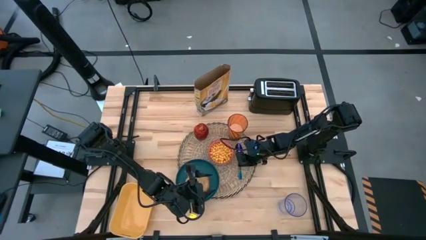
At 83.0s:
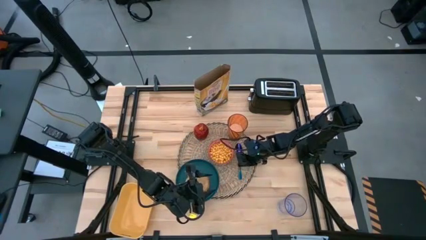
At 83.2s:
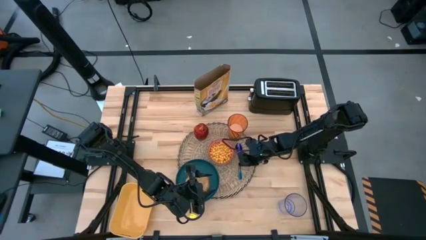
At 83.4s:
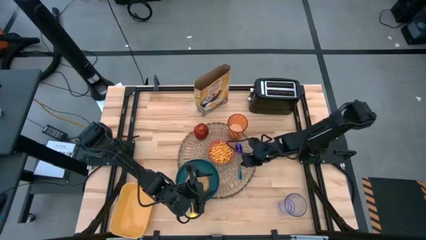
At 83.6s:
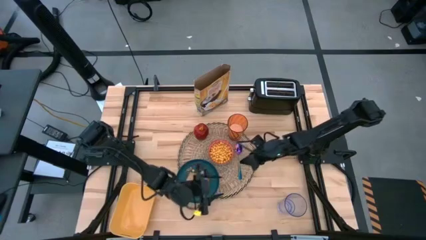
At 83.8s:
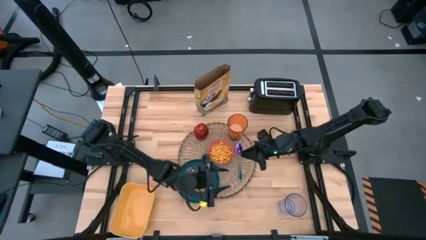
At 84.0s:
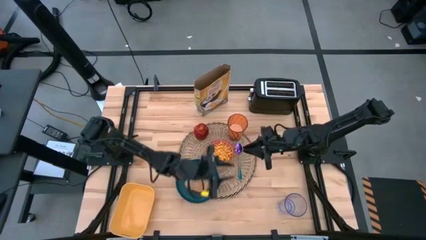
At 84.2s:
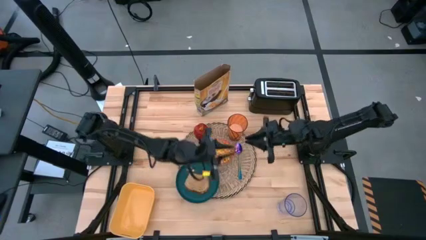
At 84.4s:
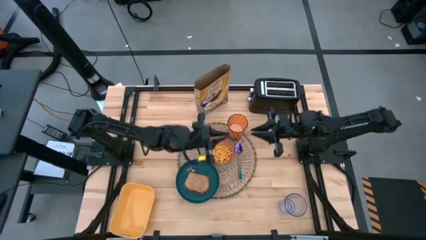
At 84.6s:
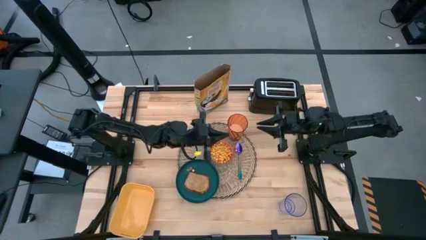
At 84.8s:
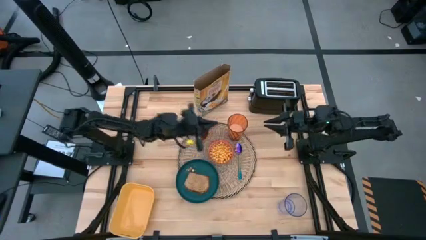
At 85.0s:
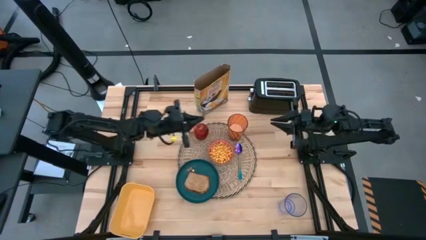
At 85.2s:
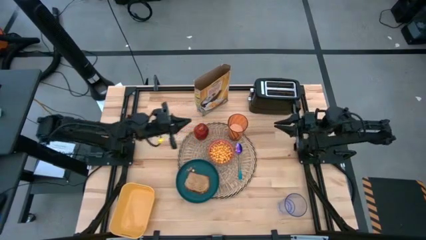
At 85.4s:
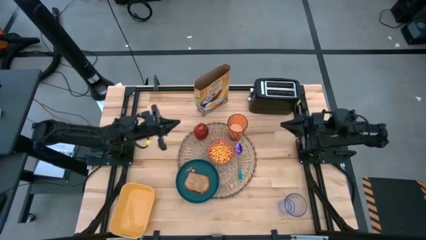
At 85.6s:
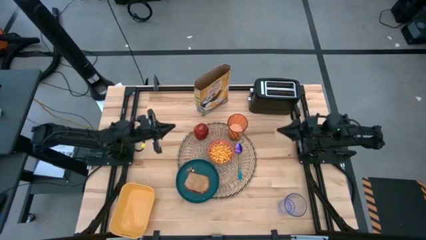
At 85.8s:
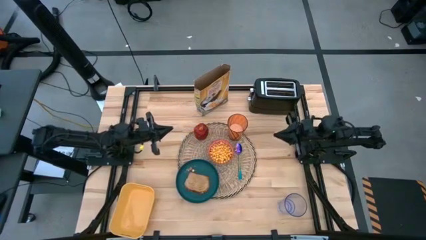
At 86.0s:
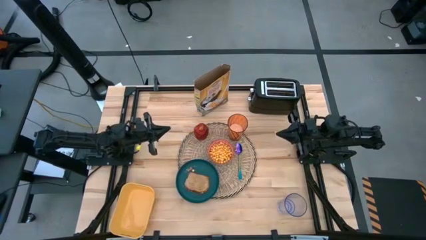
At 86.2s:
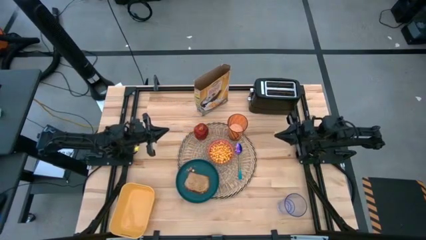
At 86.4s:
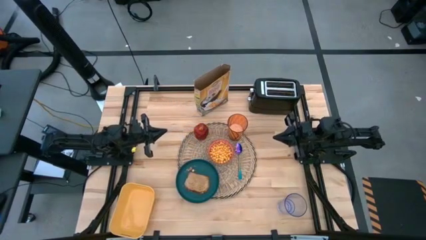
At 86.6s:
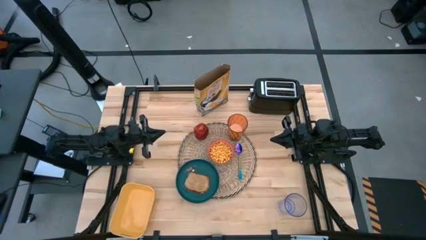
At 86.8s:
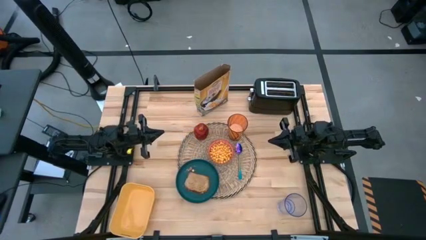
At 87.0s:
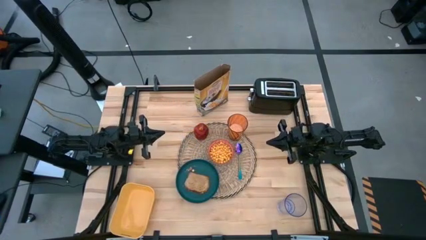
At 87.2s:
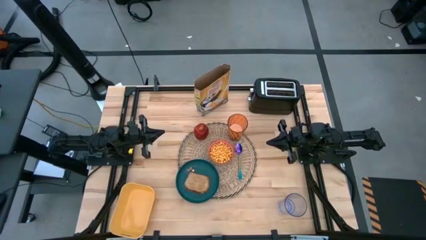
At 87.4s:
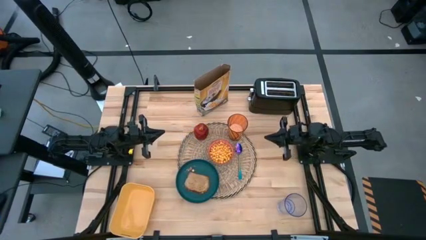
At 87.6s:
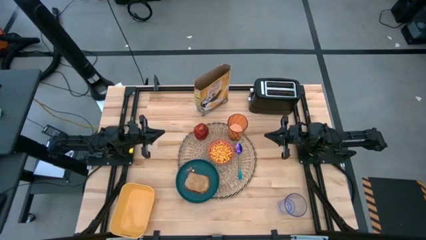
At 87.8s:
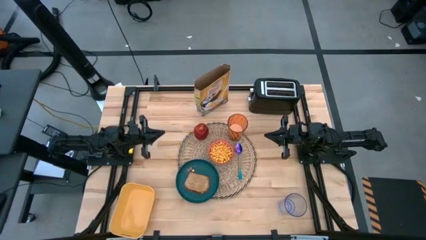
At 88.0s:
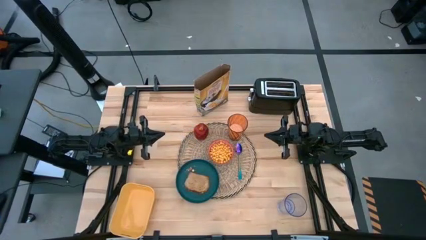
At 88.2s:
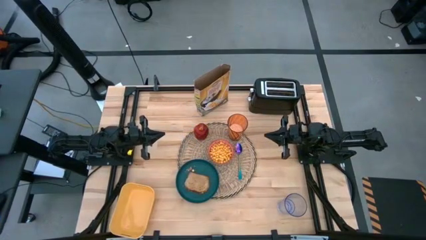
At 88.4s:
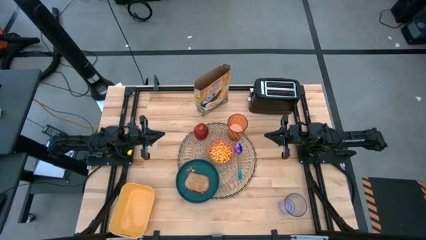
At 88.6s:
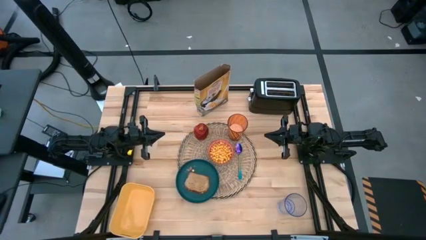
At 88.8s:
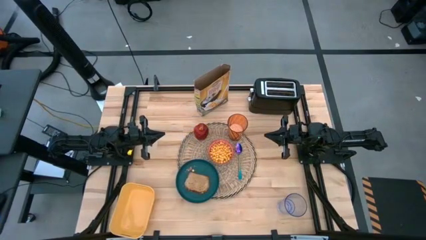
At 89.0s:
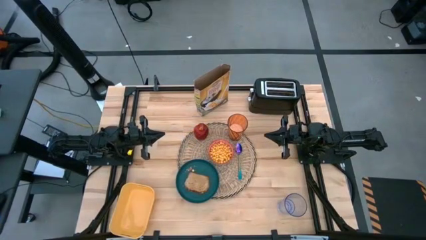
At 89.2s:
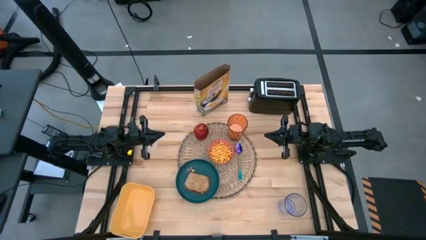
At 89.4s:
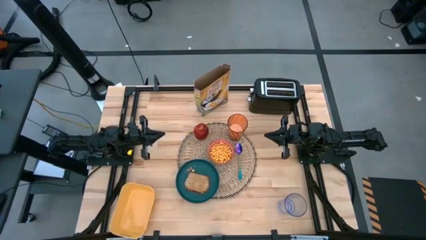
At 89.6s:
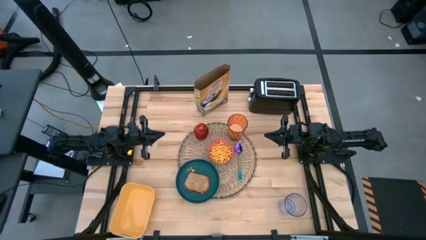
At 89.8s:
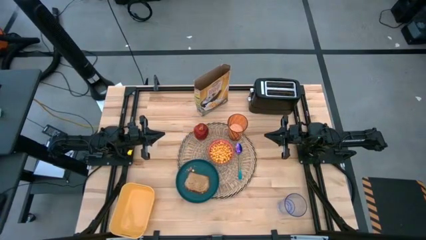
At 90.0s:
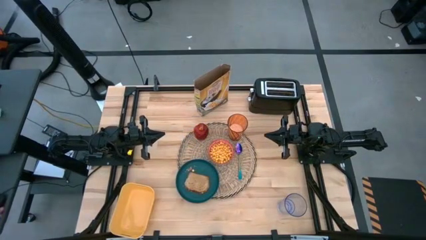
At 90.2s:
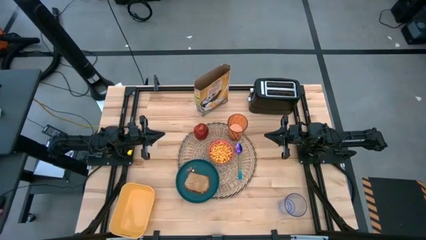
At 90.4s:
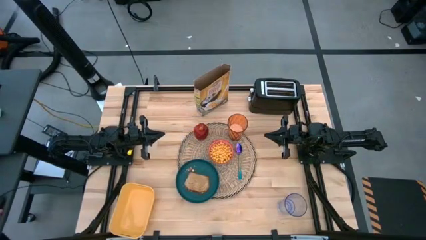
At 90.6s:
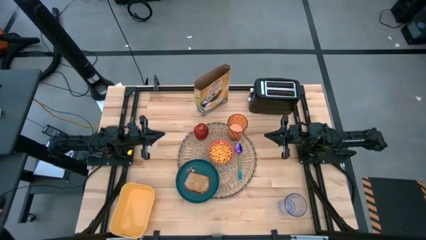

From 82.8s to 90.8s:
Task: Arrange a breakfast setting
Return to Home Position

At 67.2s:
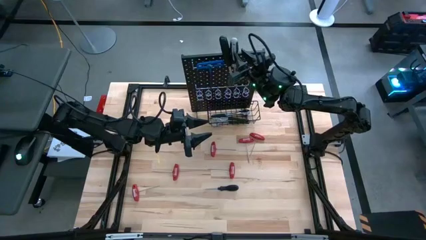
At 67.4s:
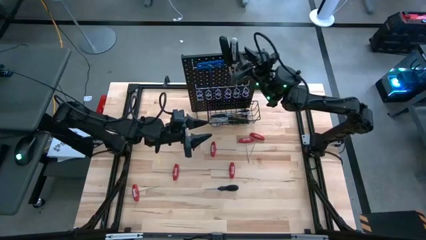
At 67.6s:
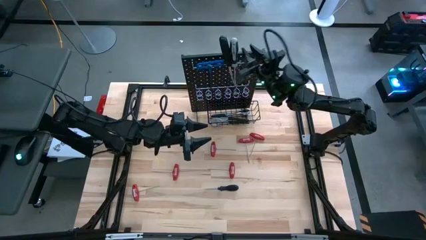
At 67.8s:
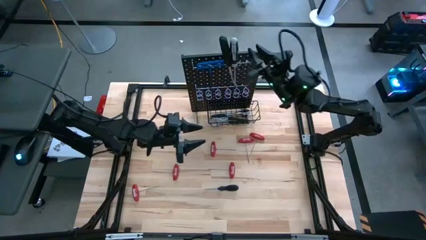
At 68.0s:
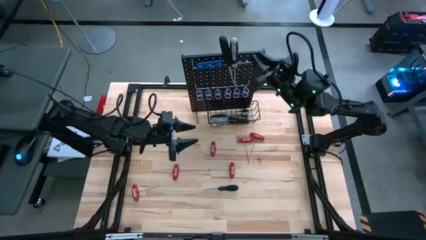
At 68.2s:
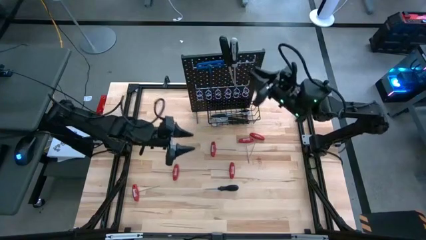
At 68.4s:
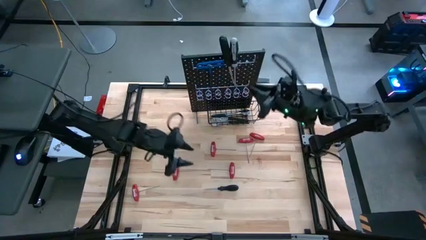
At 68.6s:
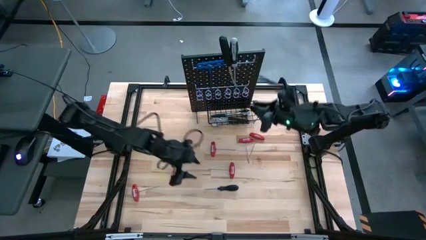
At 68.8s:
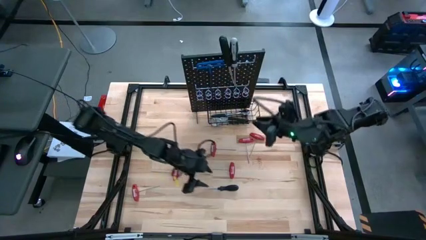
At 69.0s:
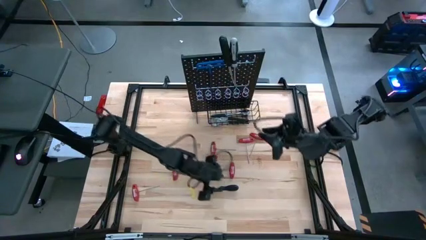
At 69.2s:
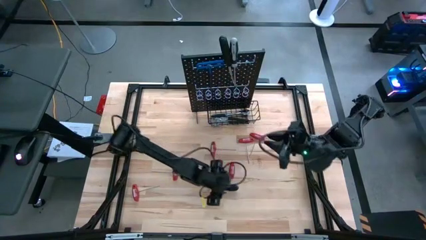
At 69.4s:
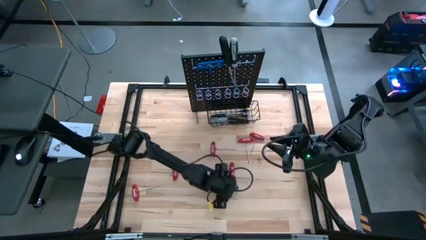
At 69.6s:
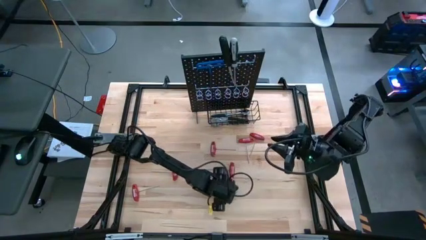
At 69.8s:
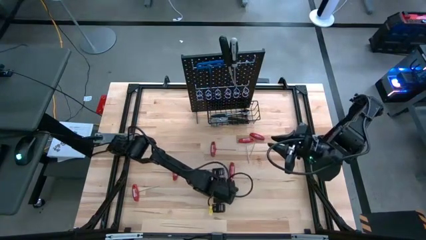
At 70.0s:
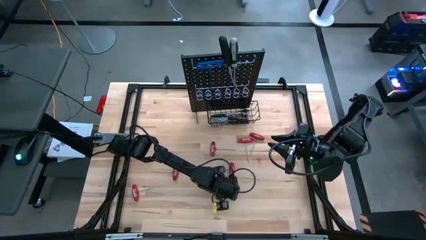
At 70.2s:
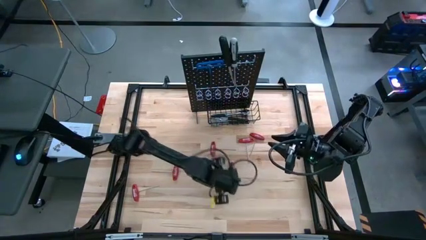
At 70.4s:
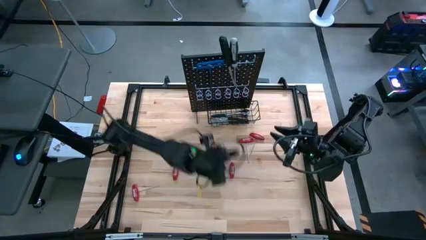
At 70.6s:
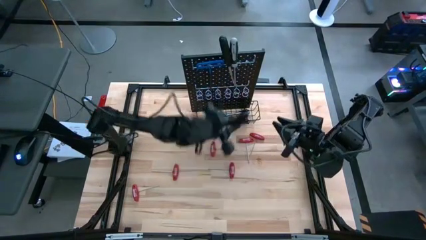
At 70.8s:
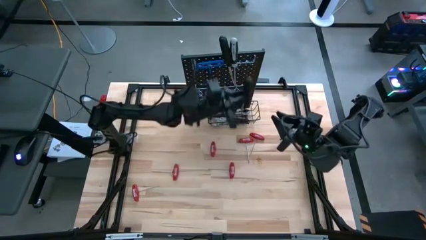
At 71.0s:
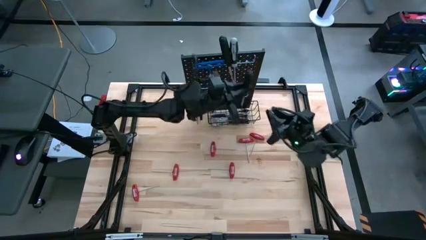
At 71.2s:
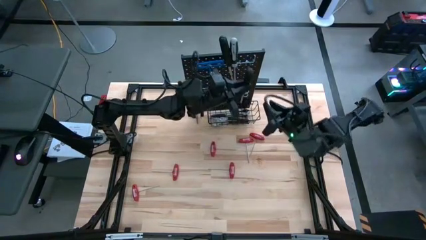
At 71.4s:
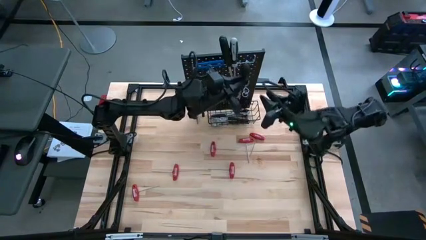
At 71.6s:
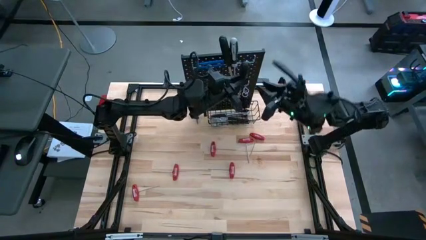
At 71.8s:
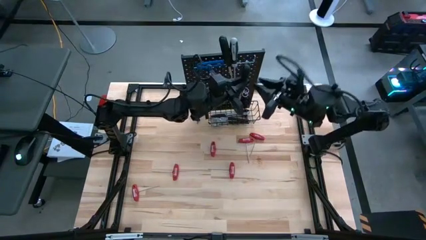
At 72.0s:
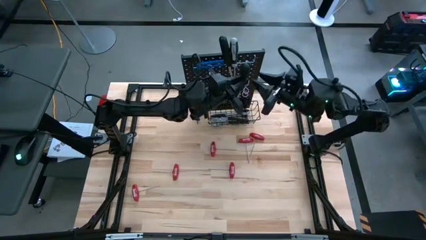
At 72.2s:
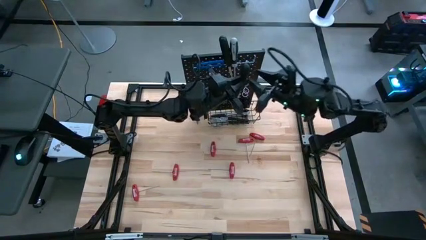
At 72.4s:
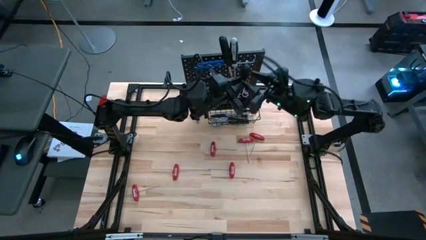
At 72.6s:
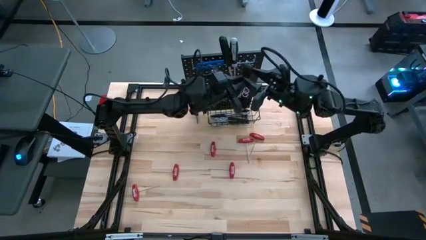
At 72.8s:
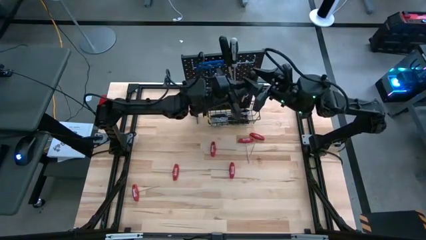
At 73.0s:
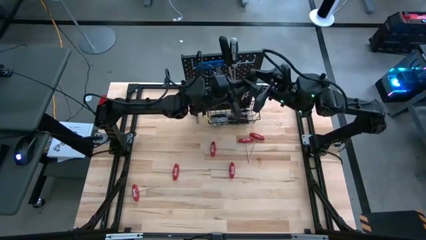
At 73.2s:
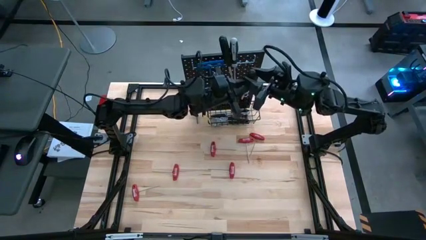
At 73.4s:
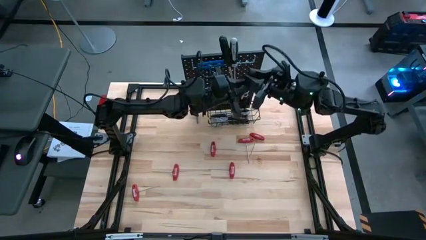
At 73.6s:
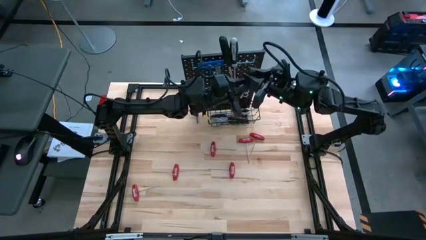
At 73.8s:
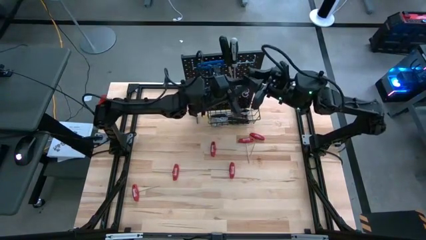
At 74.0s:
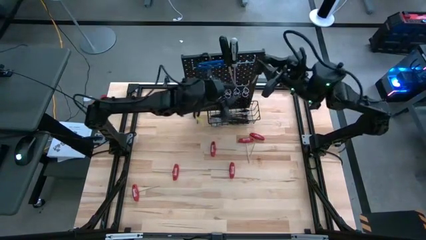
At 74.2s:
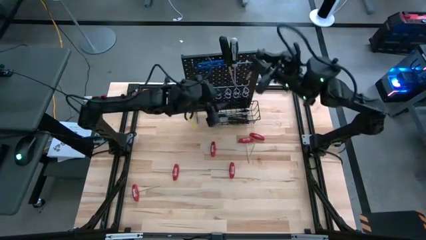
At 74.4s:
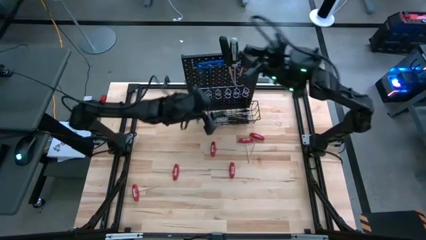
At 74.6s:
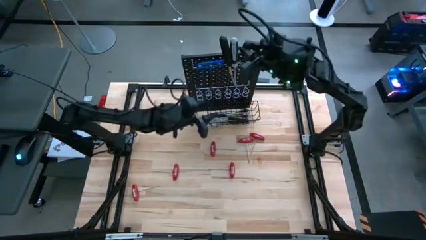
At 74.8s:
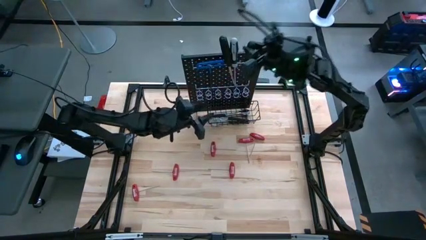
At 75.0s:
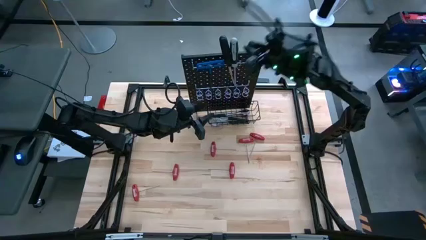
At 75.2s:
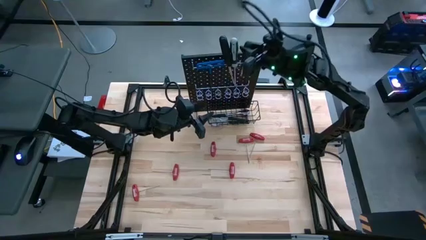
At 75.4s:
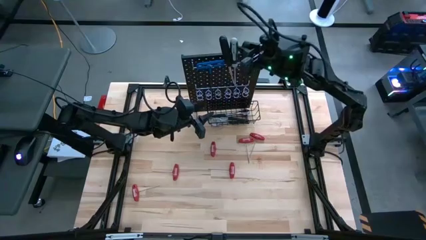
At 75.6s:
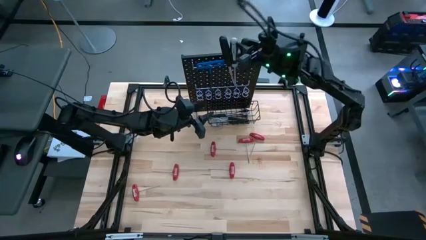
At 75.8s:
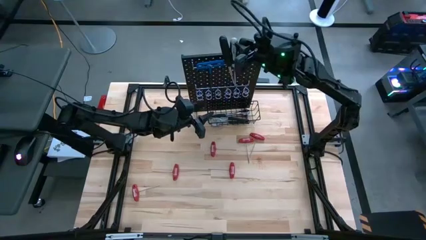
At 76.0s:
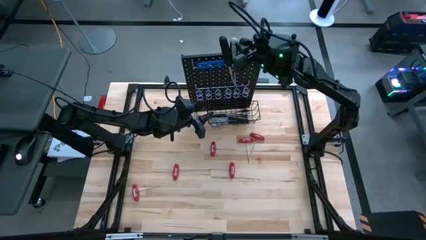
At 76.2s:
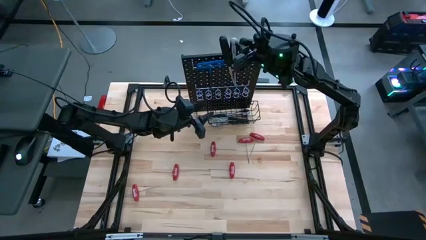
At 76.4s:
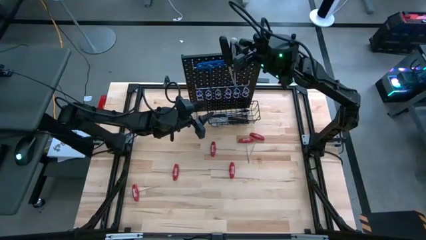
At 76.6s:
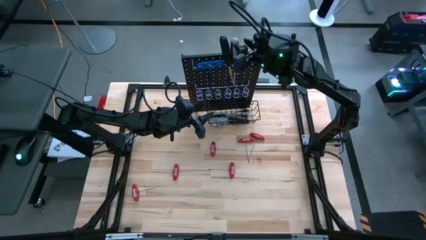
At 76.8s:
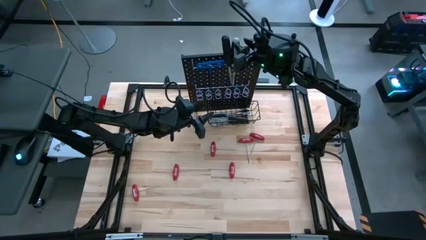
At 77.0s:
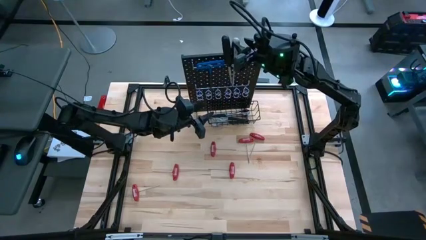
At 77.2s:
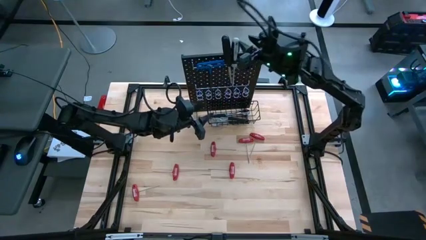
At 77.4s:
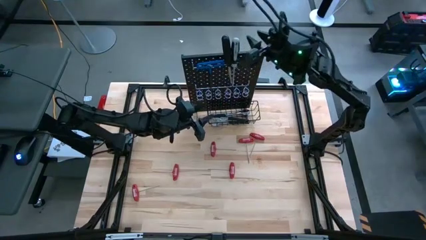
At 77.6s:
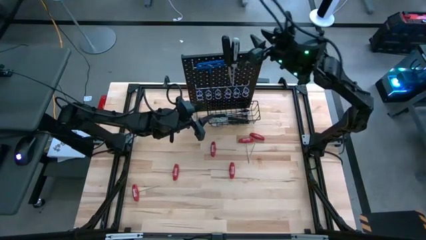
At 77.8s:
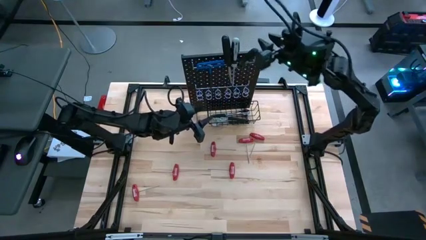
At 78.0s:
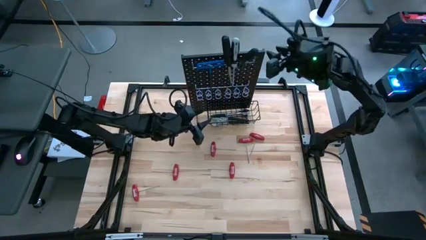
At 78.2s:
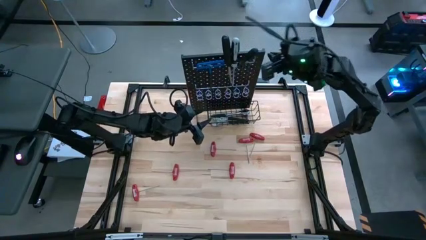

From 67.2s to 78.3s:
Task: Hang tools onto peg board
Hang the black screwdriver on the pegboard
